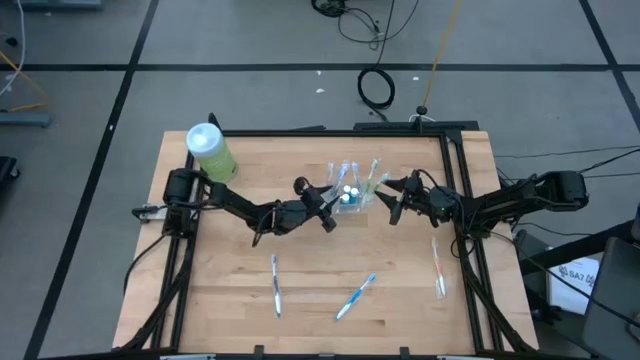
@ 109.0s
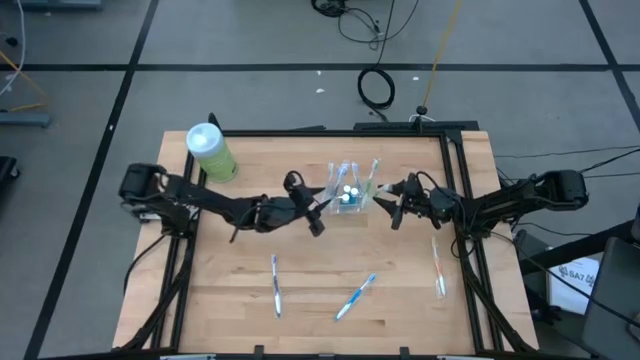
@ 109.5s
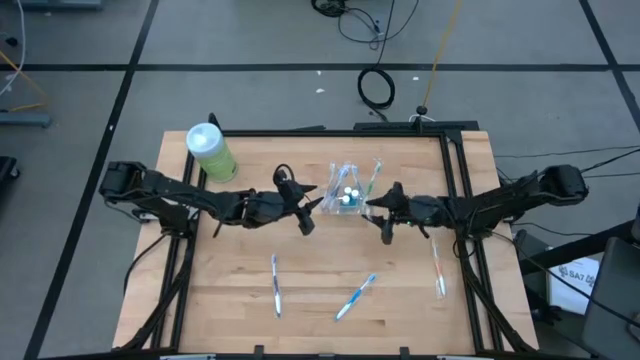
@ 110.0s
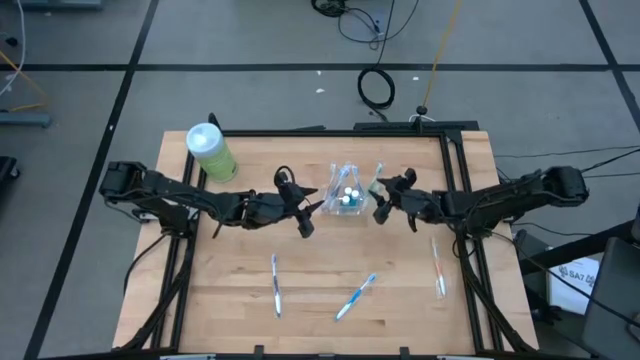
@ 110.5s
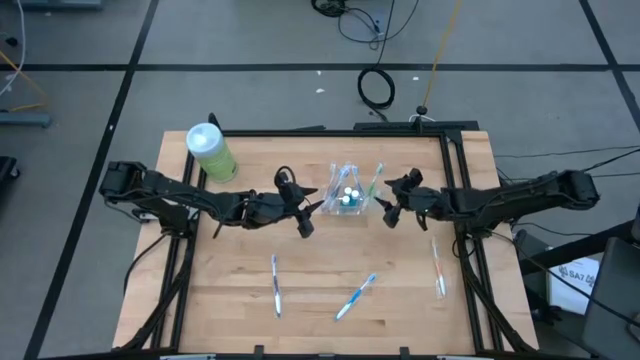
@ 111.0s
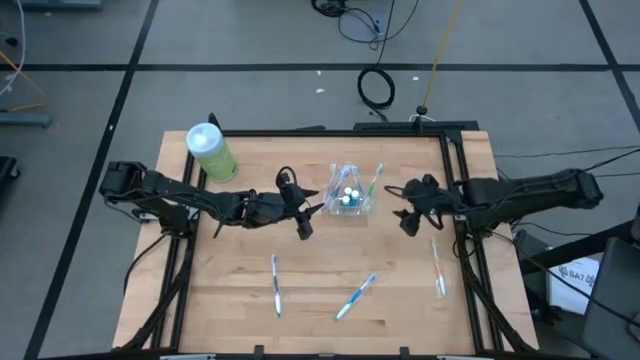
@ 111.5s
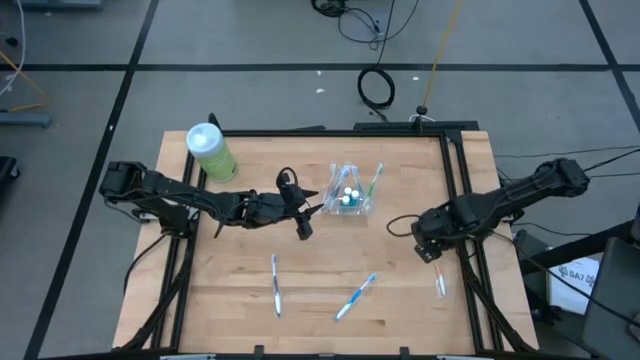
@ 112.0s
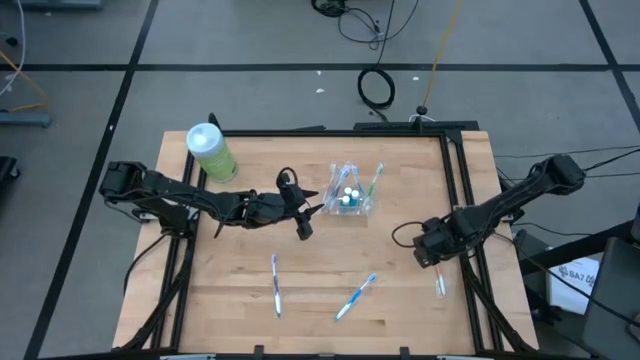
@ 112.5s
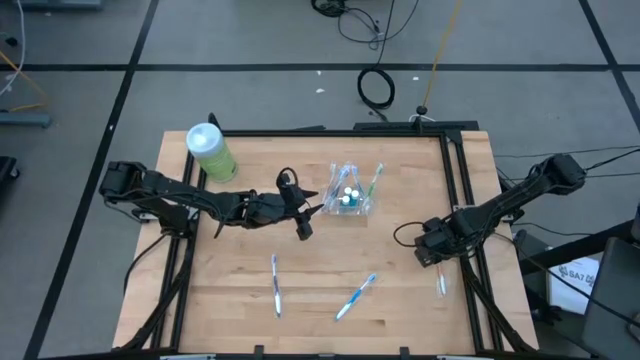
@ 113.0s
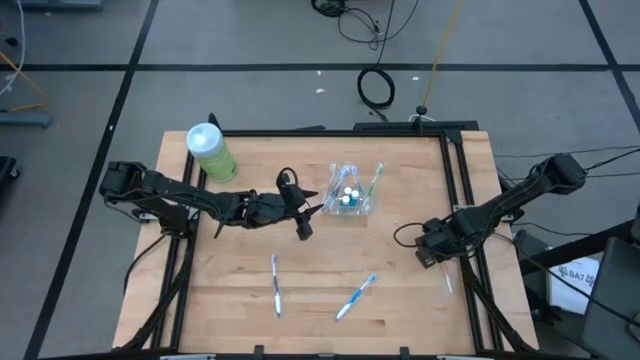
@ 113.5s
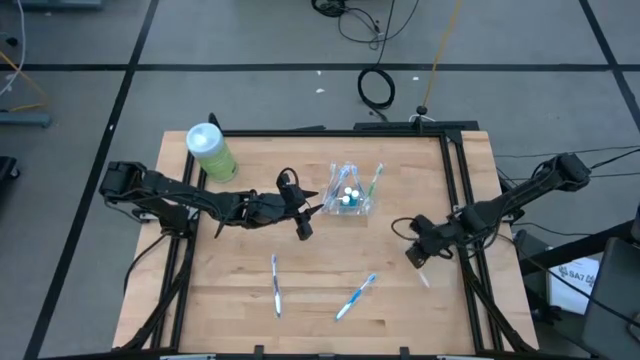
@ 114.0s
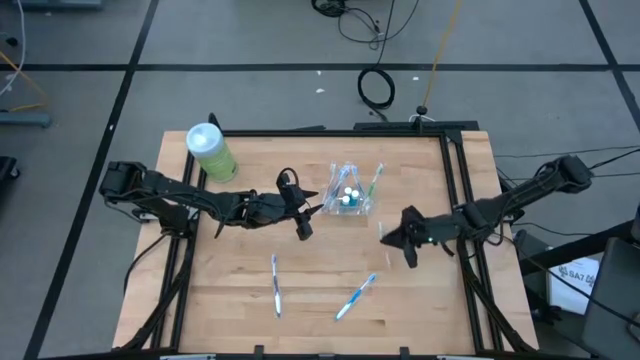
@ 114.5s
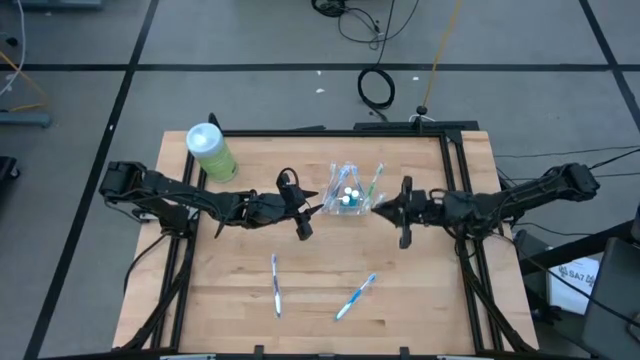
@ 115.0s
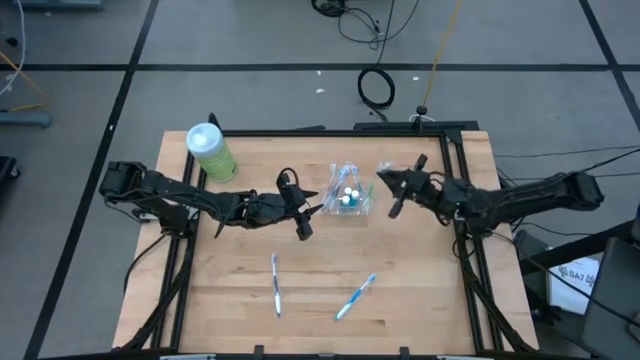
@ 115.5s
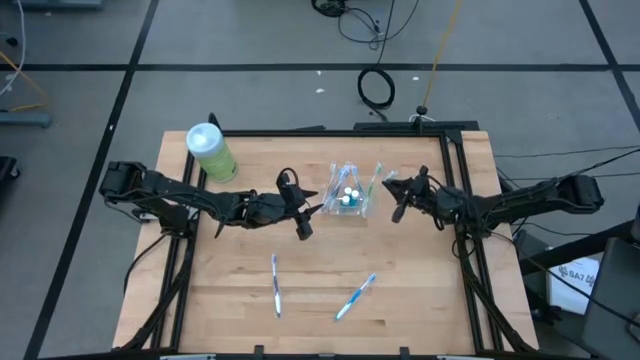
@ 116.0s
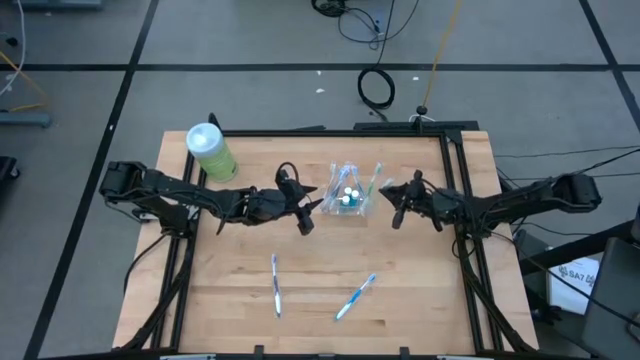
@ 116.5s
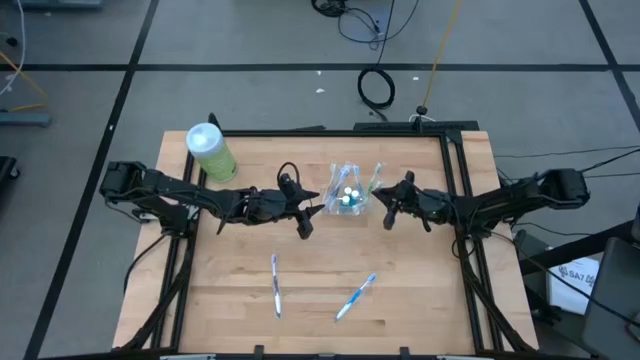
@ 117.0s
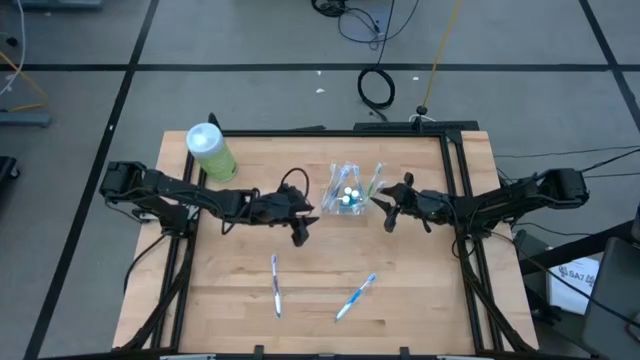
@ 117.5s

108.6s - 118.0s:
Task: Pick & Place toothbrushing station
Put the orange toothbrush into the right section of the transparent organizer

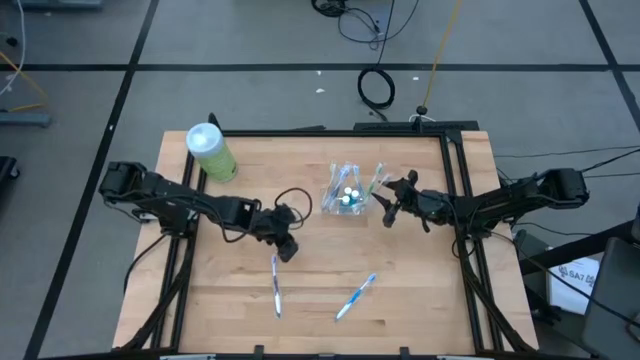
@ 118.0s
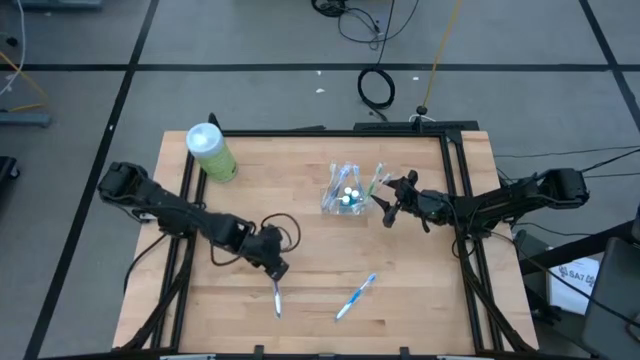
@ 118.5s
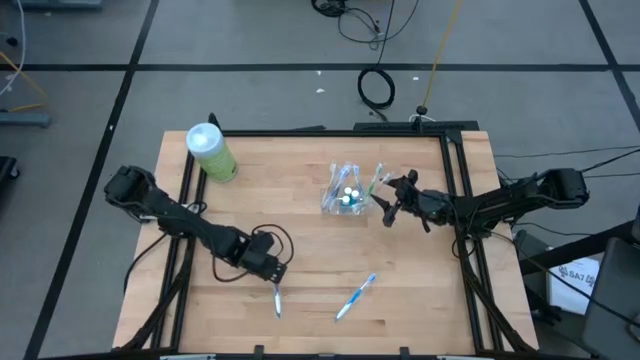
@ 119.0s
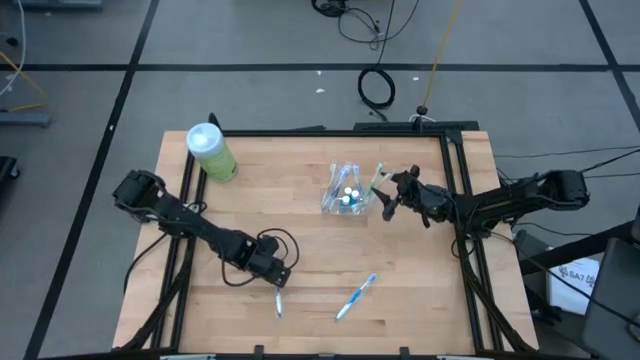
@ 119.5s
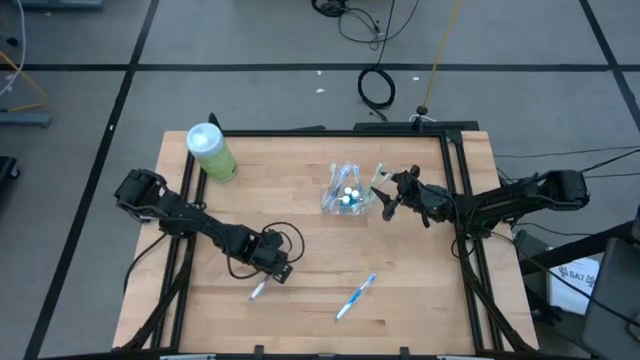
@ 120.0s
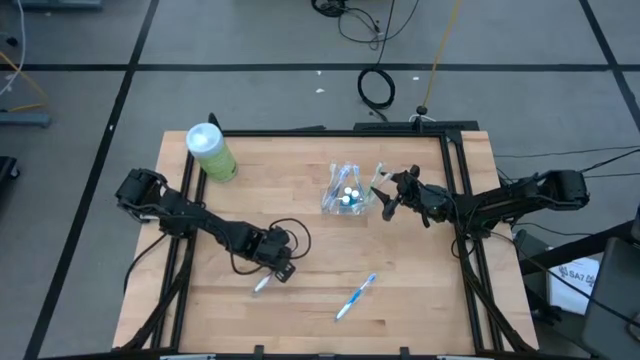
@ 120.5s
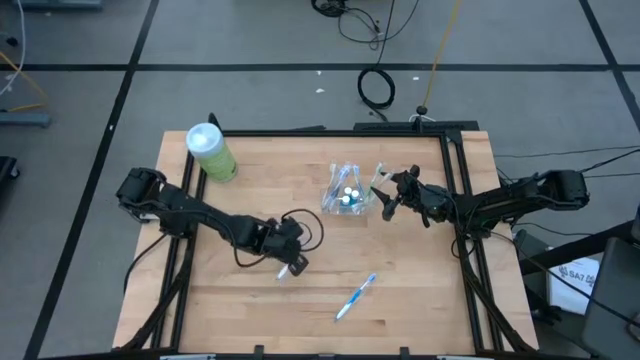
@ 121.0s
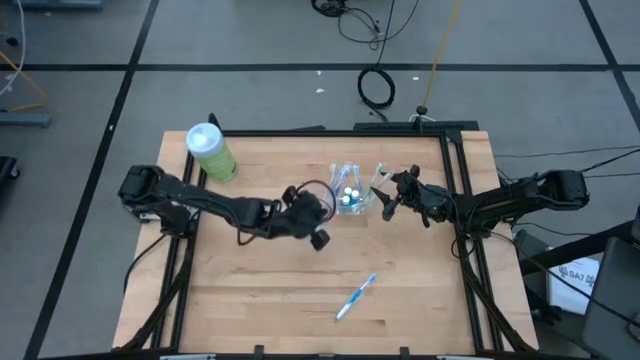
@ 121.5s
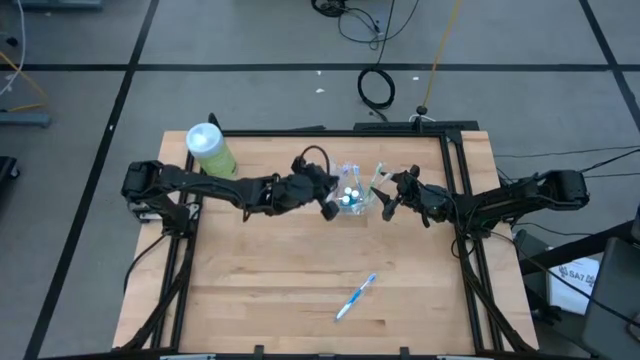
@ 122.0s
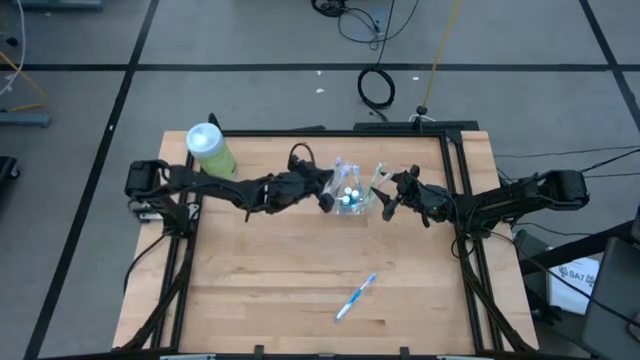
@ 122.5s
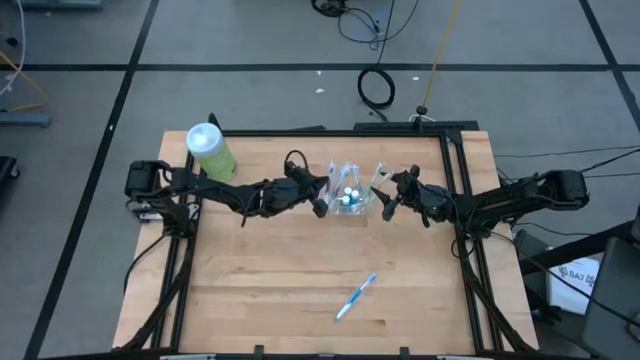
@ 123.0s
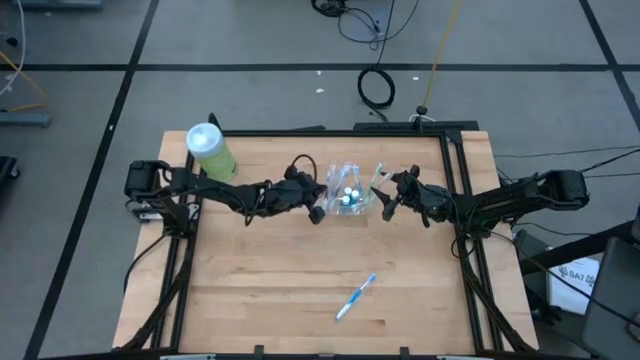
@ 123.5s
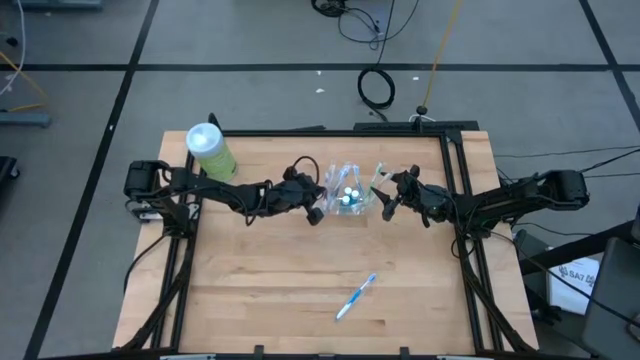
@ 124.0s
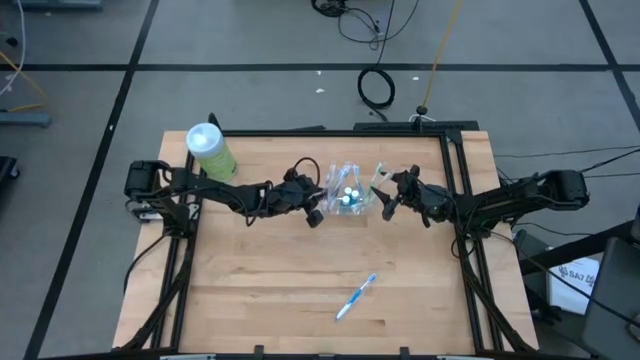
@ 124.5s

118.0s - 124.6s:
Put the purple toothbrush into the organizer

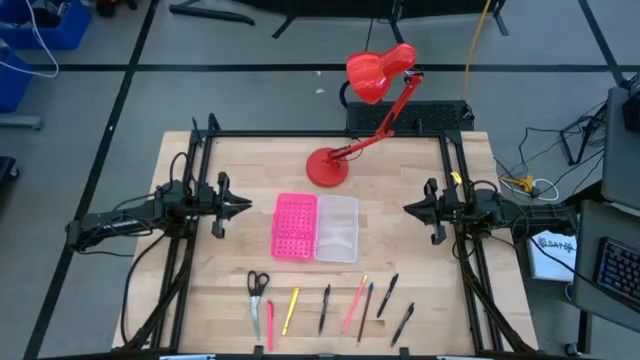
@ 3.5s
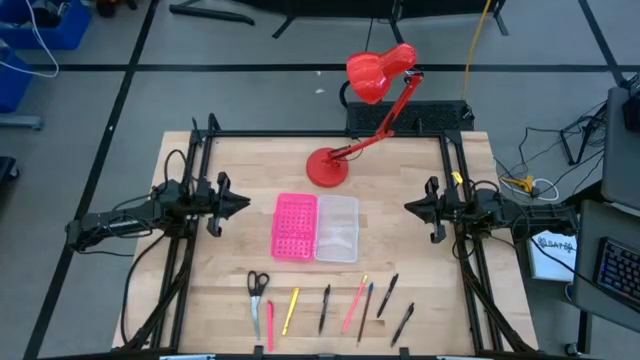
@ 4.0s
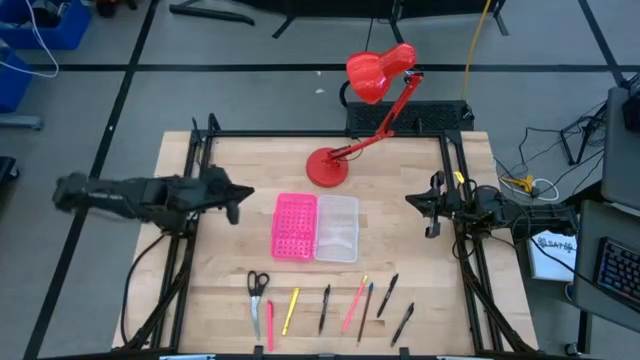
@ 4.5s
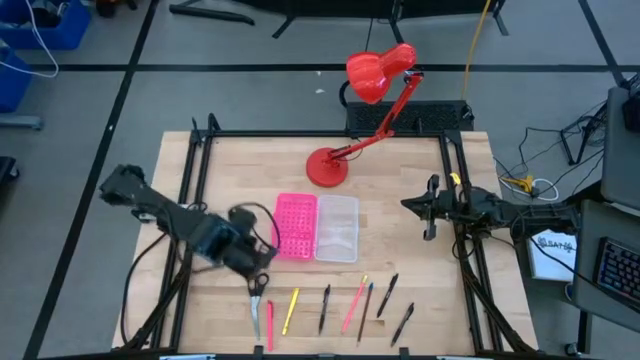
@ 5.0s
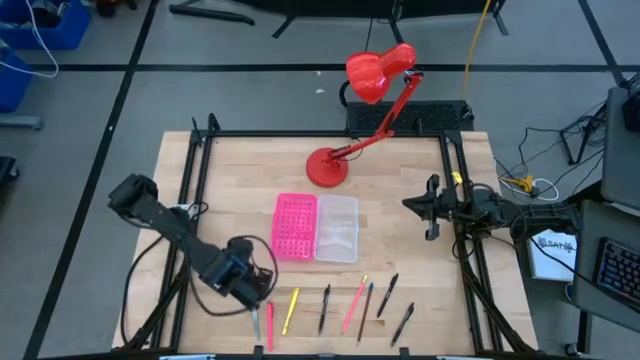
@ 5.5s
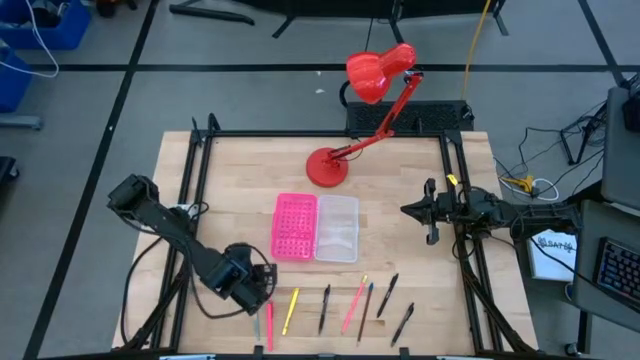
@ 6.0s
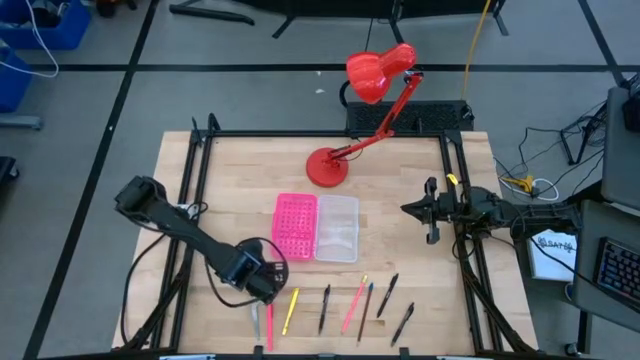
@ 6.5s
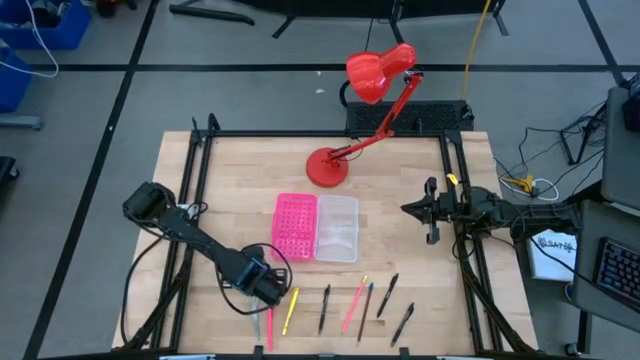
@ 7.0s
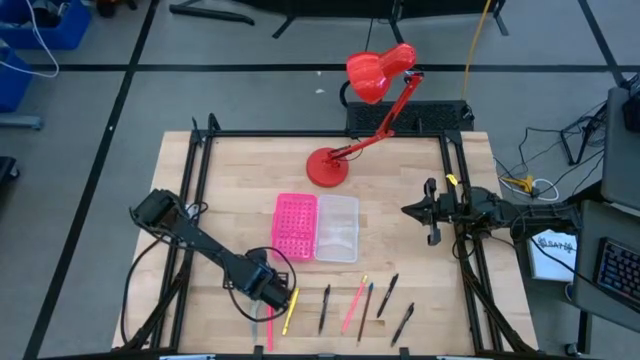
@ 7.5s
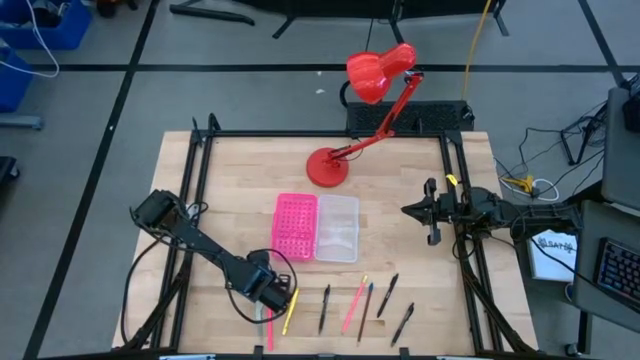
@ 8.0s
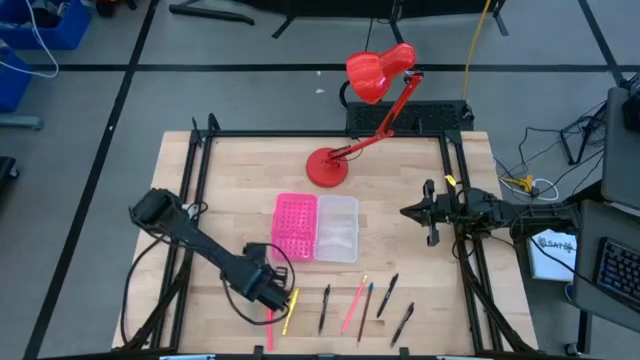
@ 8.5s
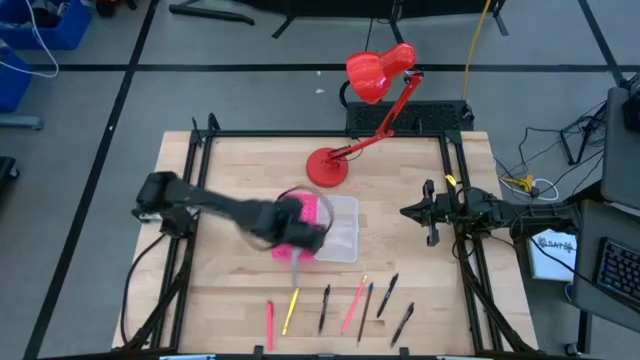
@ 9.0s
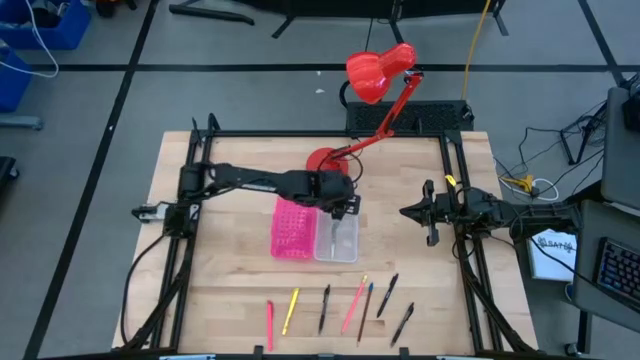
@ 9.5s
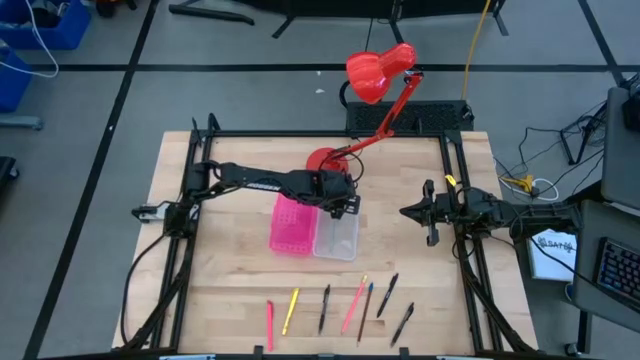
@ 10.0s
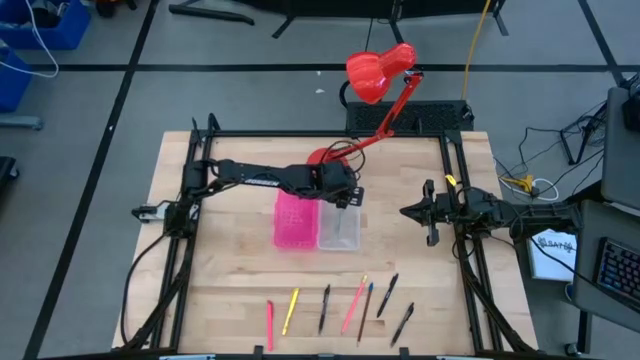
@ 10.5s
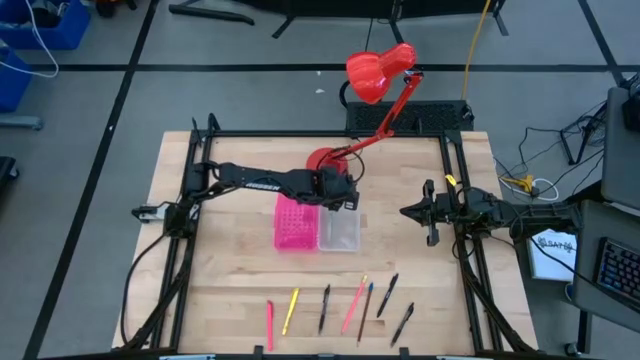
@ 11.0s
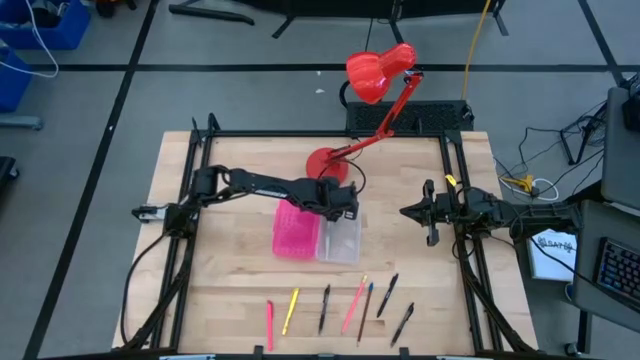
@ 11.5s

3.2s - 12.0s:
Task: Pick & place school supplies into a supply box
Put the black scissors into the pink supply box
